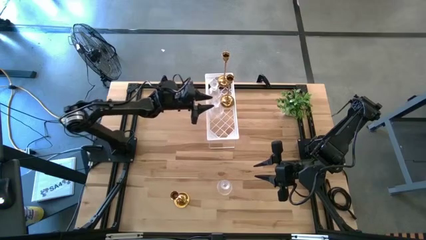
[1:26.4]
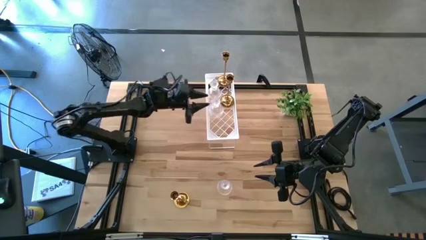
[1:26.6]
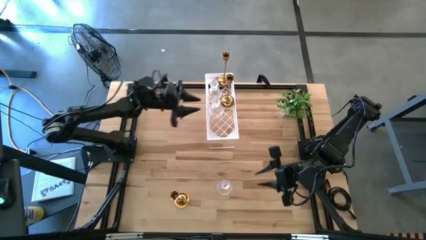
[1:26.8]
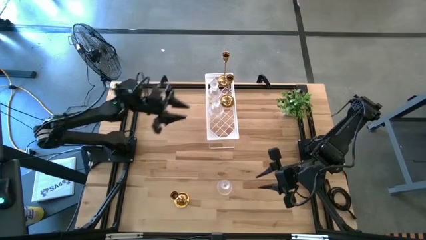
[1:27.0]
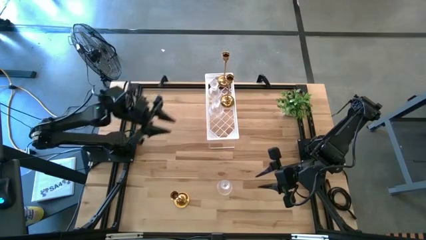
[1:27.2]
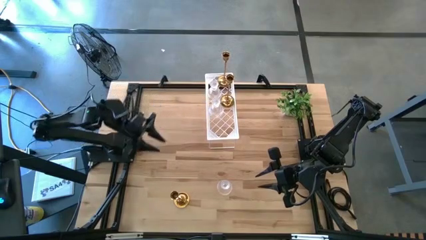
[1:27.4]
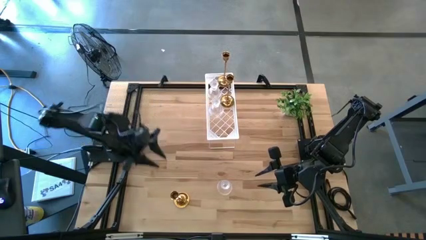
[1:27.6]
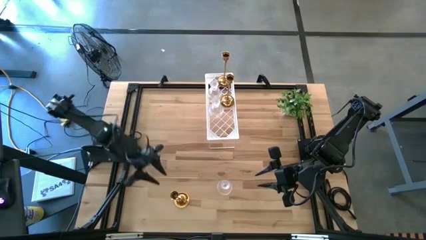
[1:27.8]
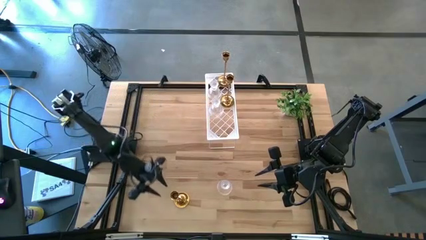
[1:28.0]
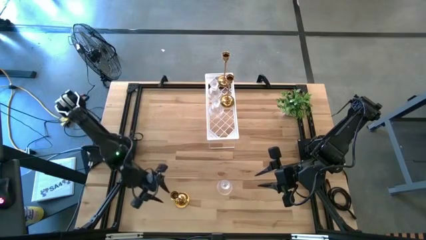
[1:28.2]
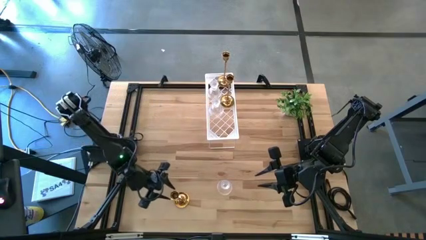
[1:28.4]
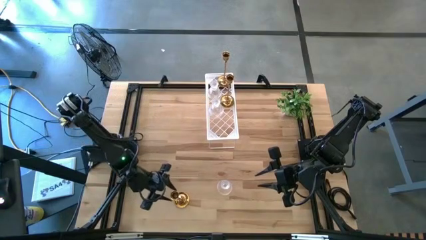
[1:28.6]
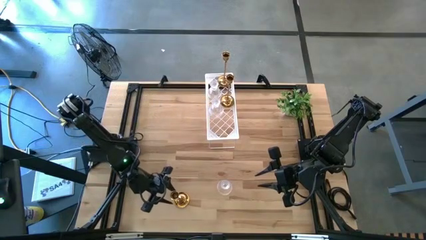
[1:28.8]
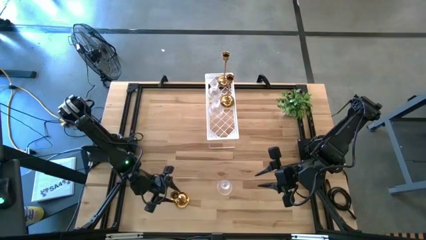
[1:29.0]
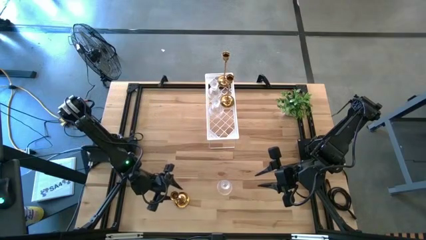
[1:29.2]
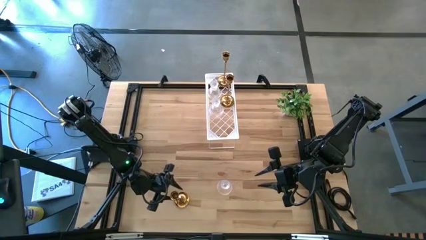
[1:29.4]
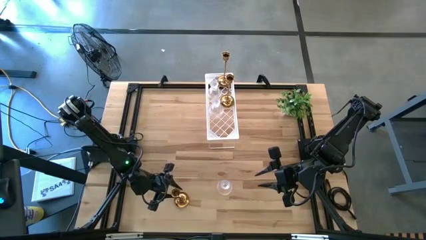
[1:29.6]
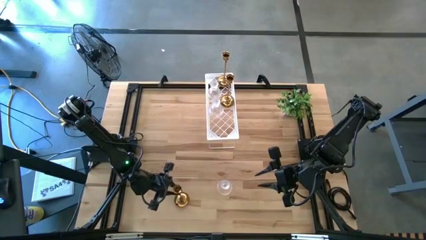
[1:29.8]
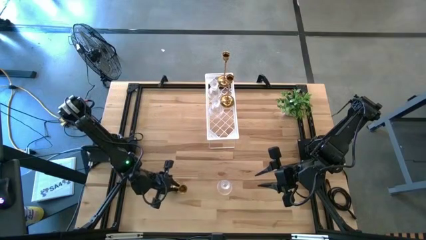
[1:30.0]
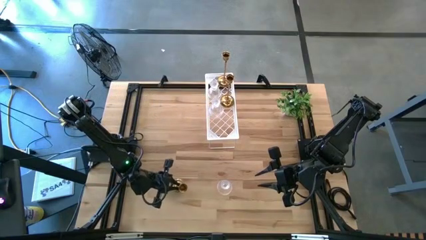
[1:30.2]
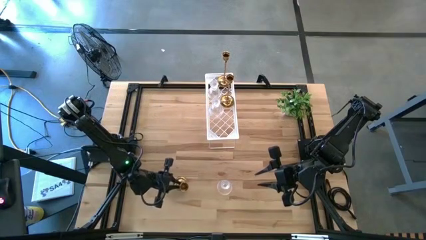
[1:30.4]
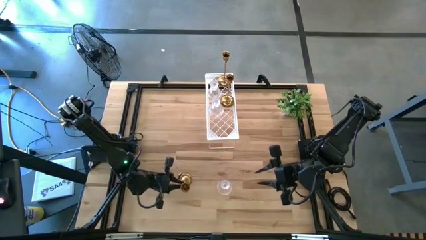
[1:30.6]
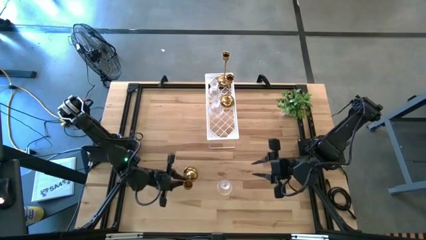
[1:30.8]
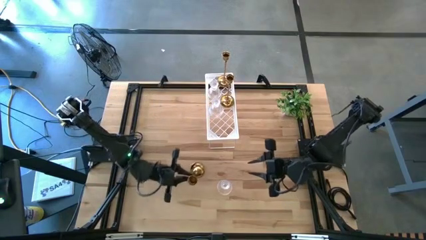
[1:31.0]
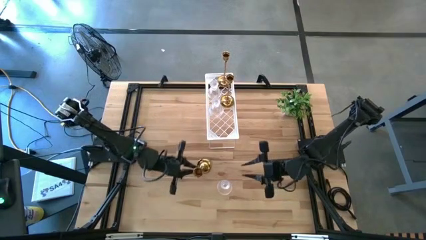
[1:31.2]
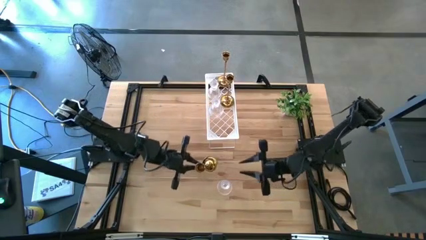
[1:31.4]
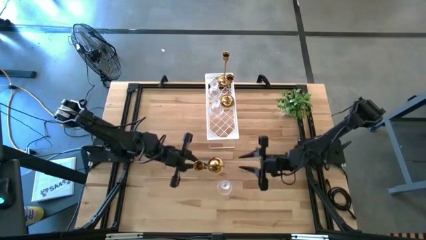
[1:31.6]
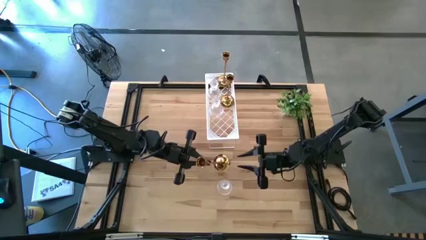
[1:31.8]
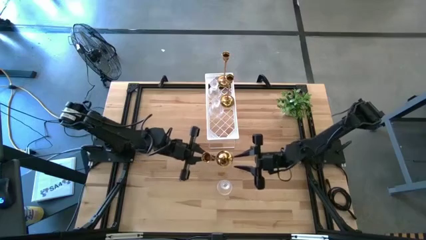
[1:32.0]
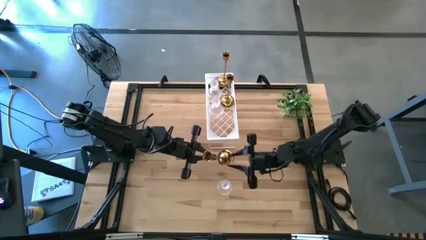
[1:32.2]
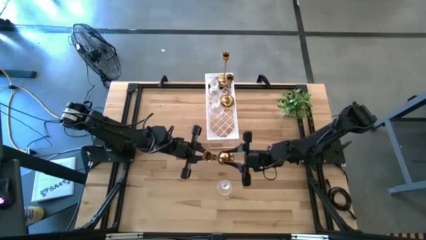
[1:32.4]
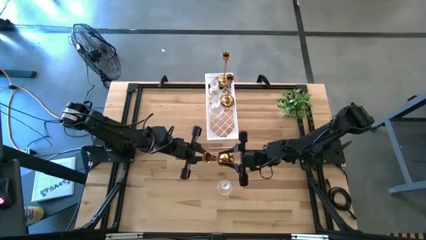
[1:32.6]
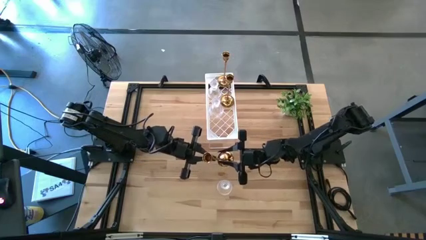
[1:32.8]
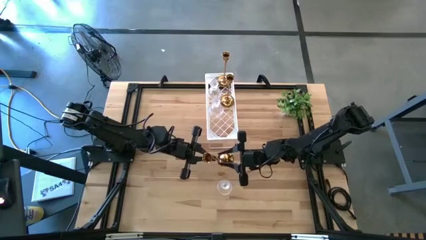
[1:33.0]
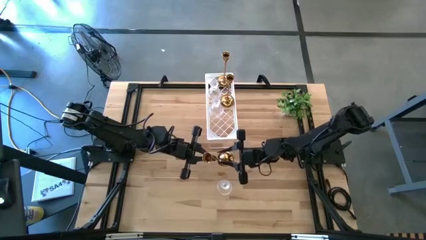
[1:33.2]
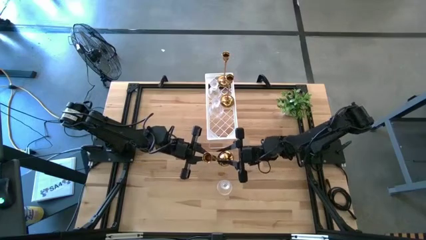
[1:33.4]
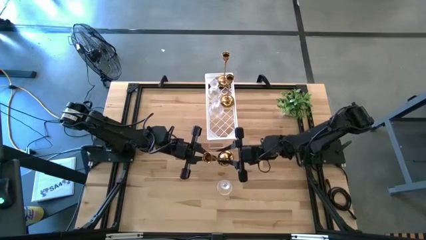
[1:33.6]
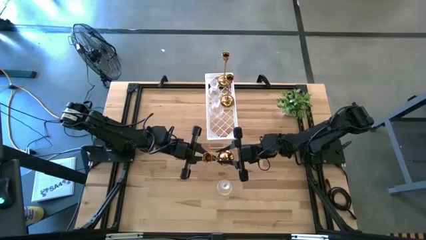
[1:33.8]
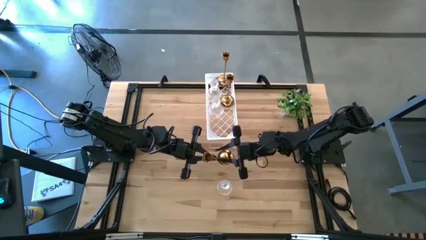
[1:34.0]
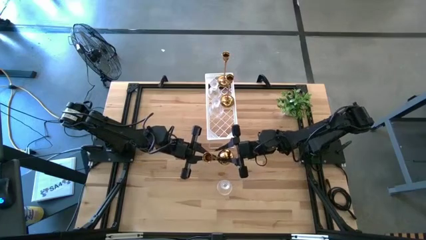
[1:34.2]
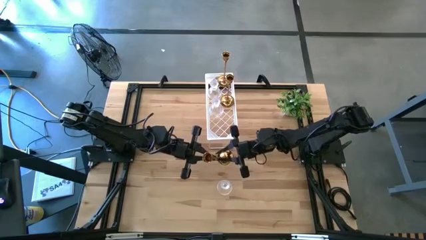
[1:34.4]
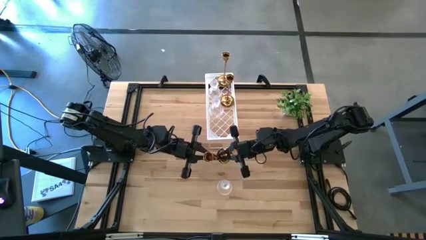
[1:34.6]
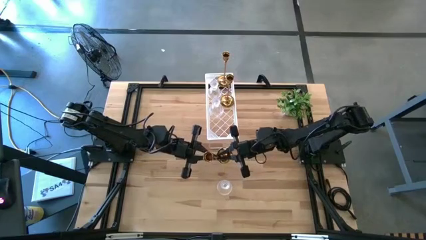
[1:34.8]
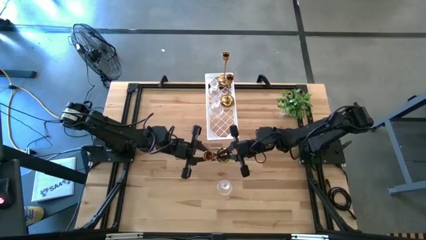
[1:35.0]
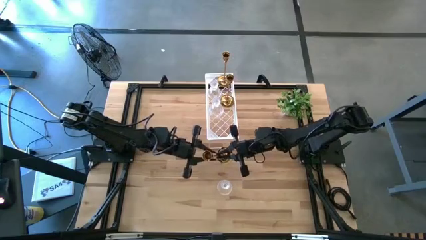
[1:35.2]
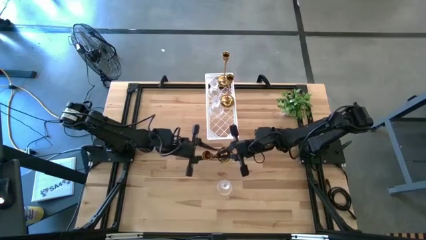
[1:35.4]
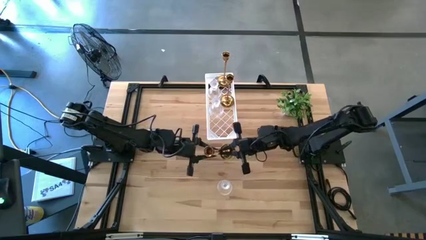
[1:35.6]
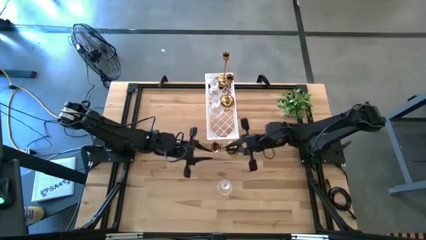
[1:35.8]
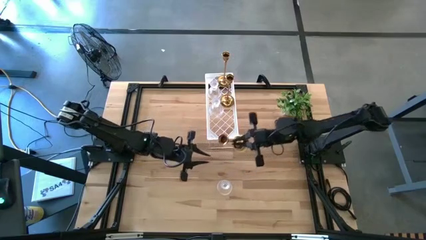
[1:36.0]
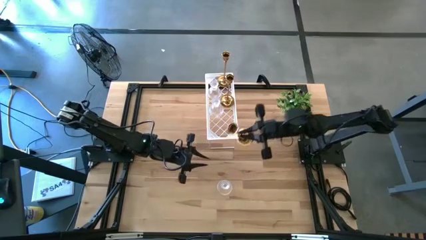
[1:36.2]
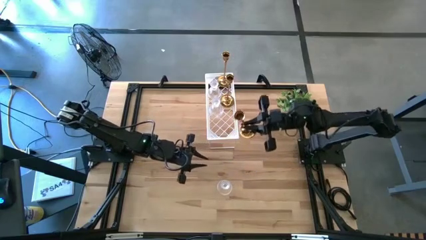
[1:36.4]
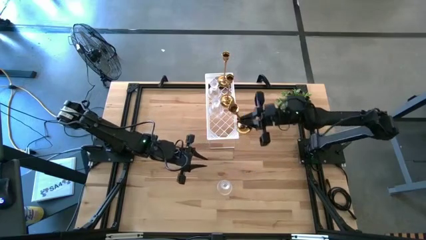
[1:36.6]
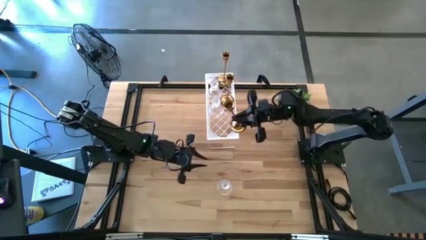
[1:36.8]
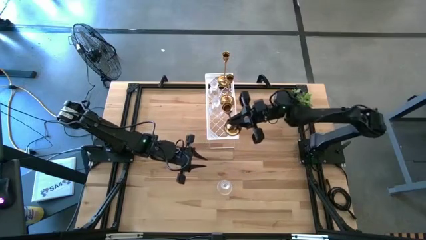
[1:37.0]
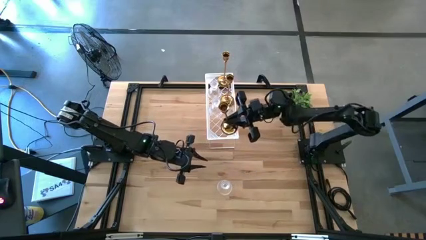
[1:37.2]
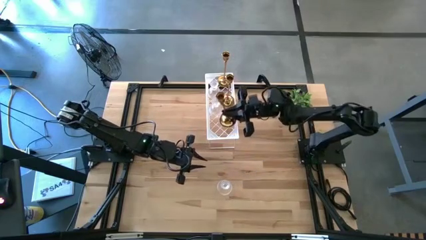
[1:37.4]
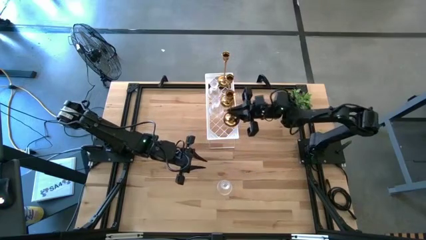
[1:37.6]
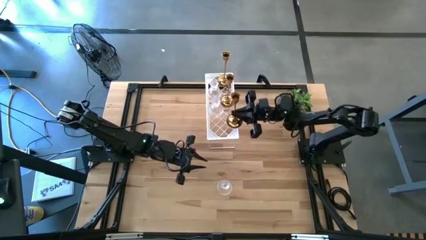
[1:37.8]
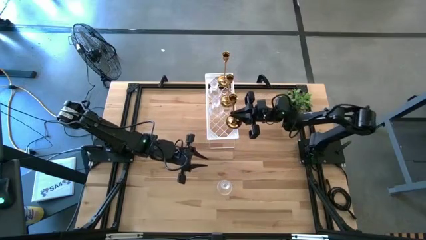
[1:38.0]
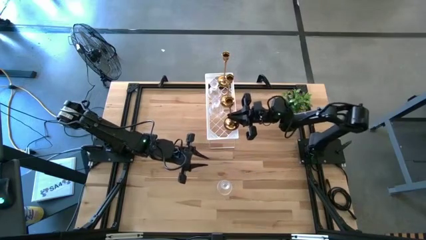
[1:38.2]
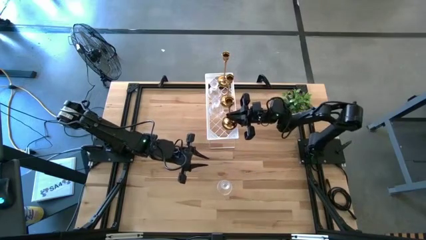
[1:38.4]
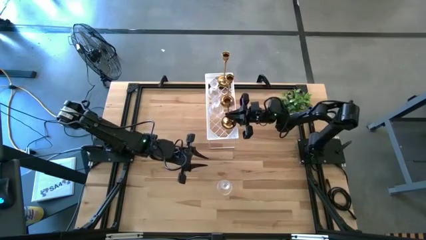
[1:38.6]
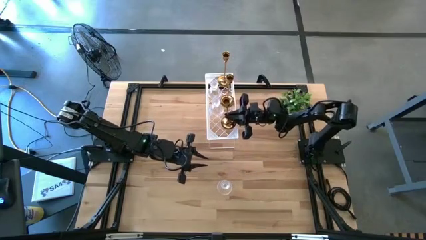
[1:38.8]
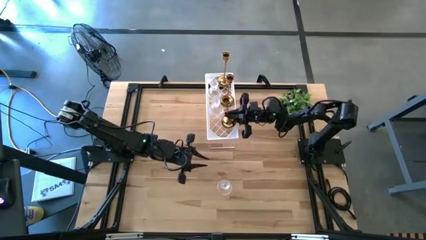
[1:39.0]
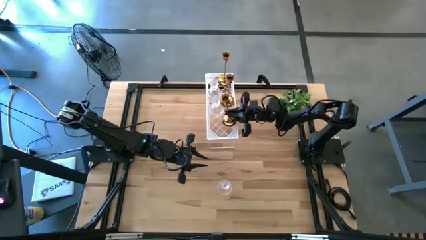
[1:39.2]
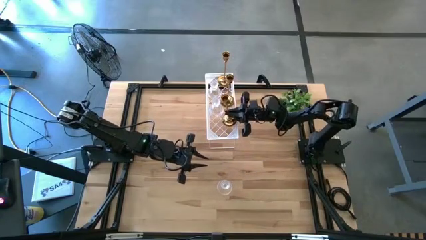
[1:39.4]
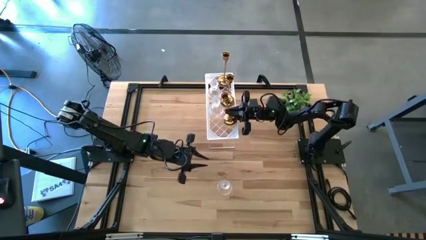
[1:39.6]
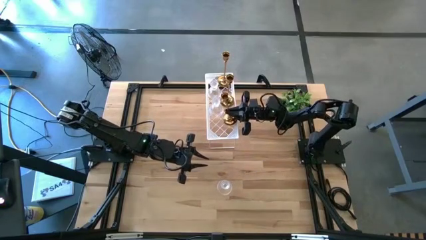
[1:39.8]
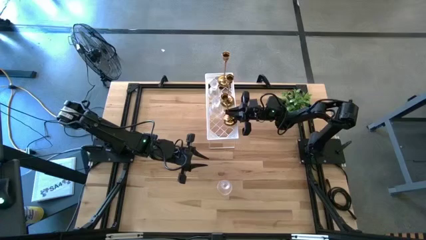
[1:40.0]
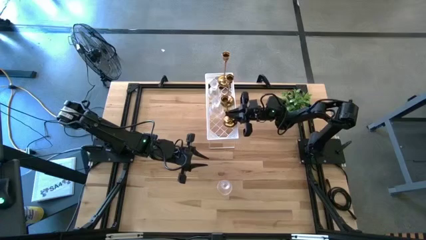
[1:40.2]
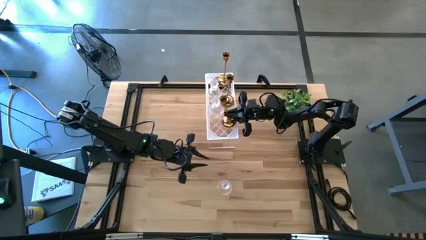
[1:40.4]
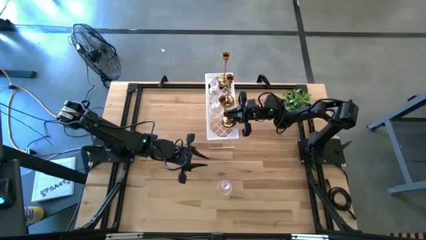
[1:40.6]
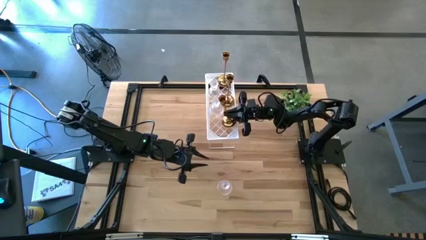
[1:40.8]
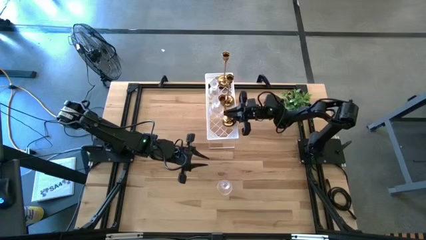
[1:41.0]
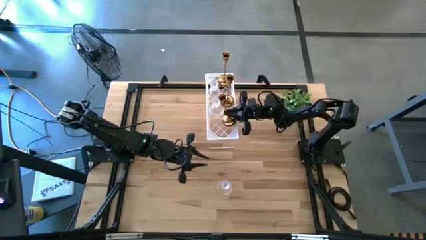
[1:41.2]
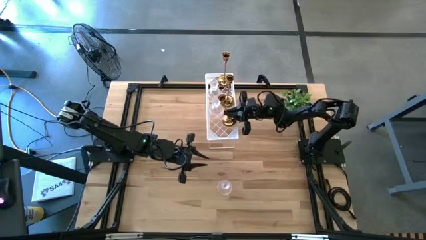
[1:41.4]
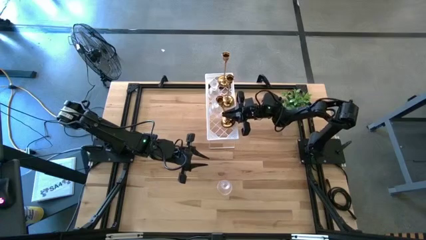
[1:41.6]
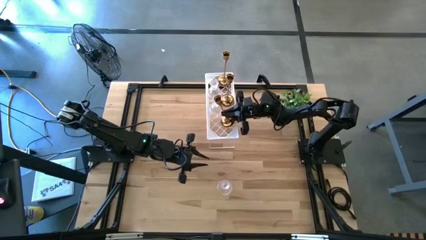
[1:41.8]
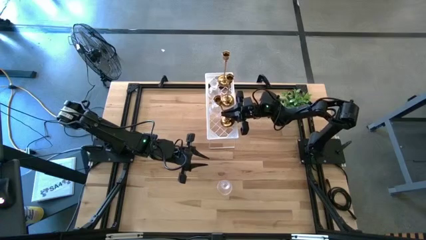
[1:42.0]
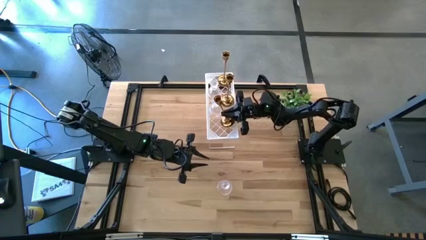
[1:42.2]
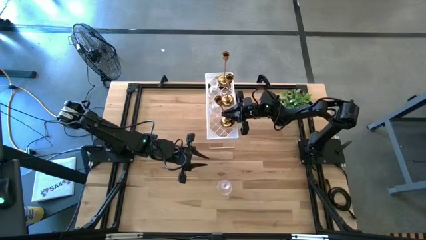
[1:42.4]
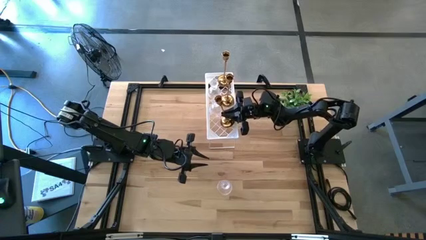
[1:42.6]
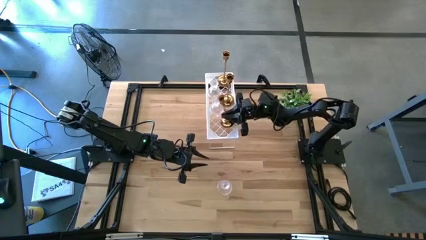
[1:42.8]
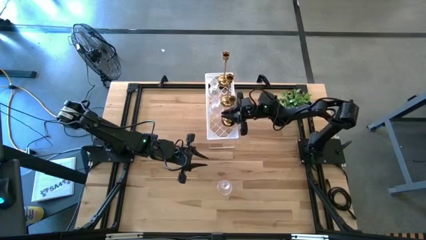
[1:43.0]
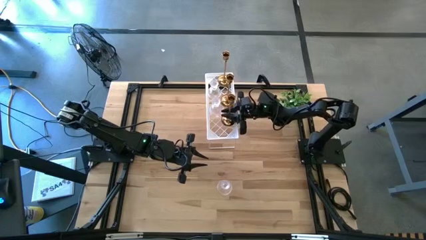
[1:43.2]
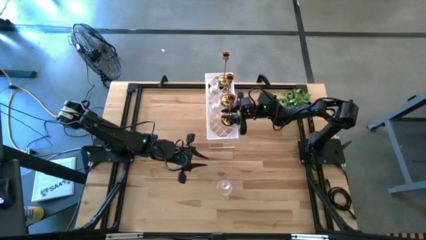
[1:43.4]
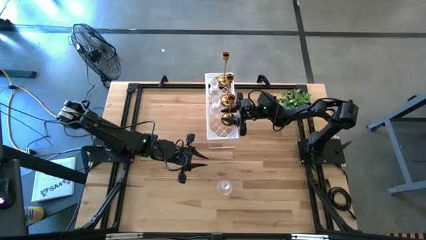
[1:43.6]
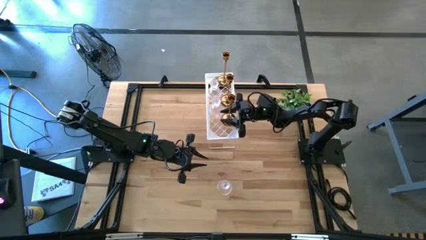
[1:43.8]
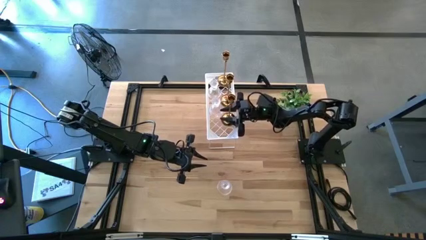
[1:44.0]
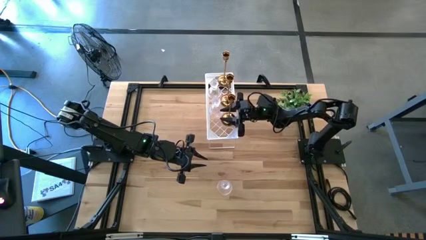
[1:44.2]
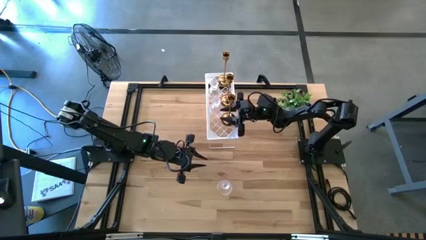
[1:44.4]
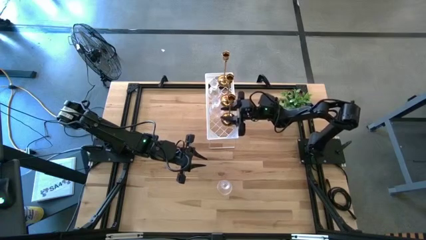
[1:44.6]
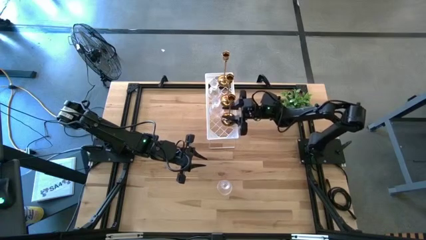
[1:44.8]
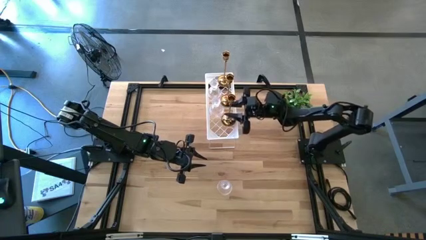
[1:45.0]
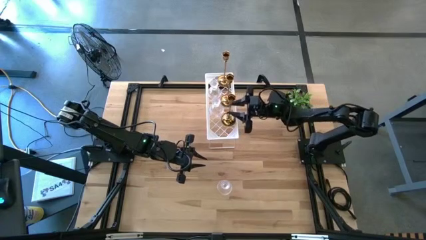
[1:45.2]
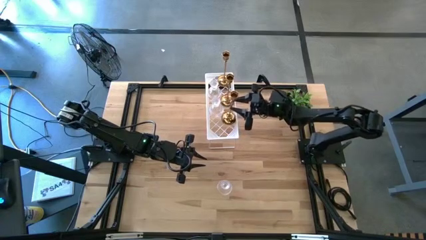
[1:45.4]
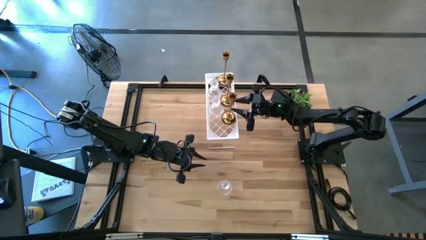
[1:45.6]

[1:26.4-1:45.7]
Task: Pick & Place candle stick holders
Put the gold candle holder on the shelf aligned with the other gold candle holders
